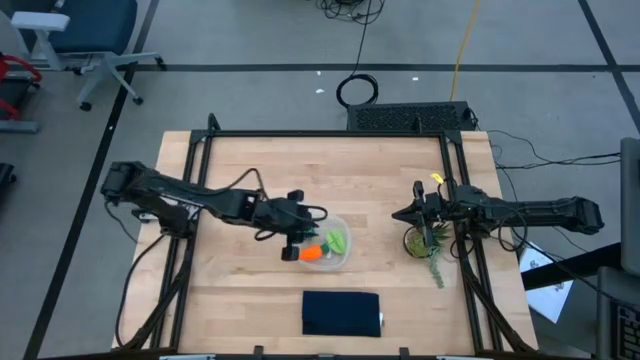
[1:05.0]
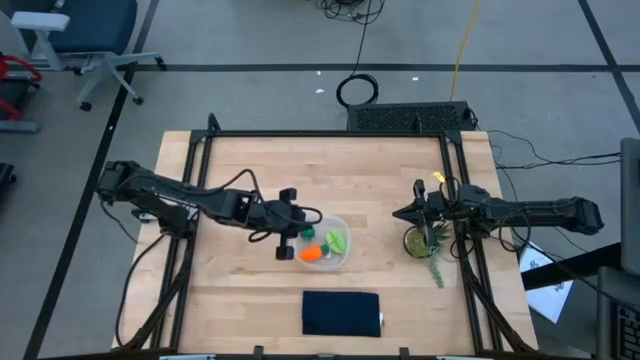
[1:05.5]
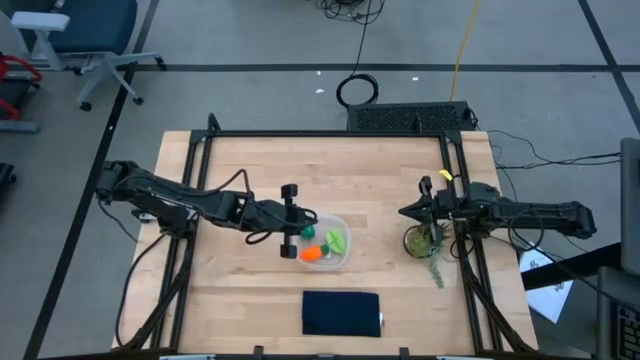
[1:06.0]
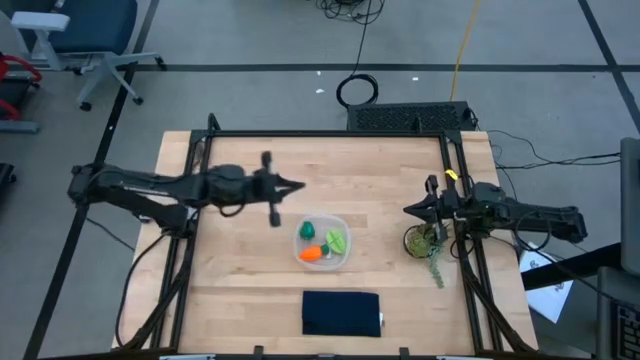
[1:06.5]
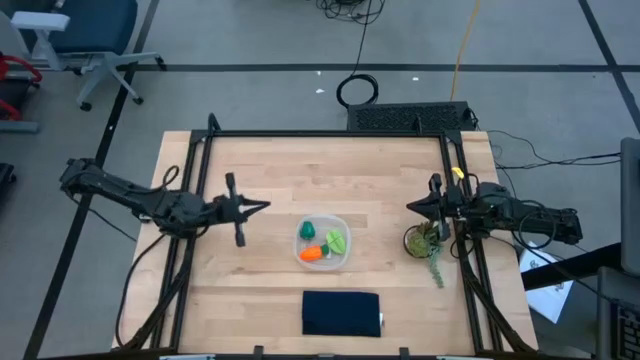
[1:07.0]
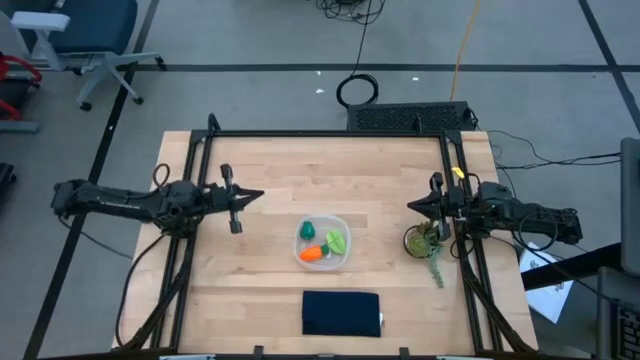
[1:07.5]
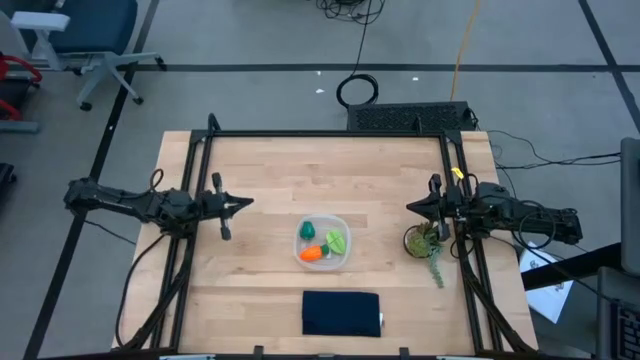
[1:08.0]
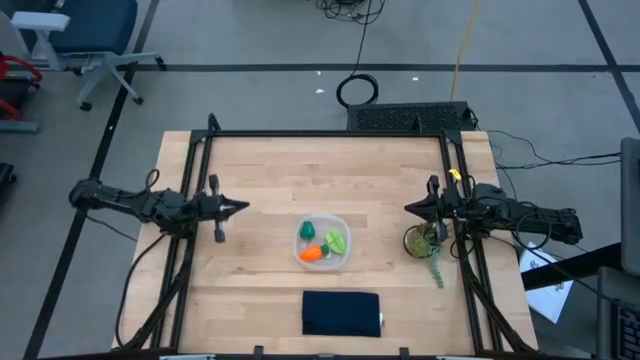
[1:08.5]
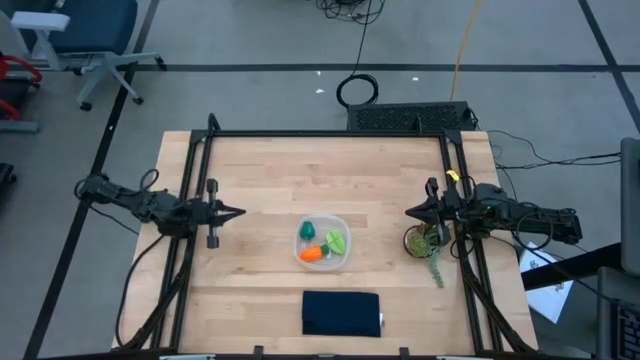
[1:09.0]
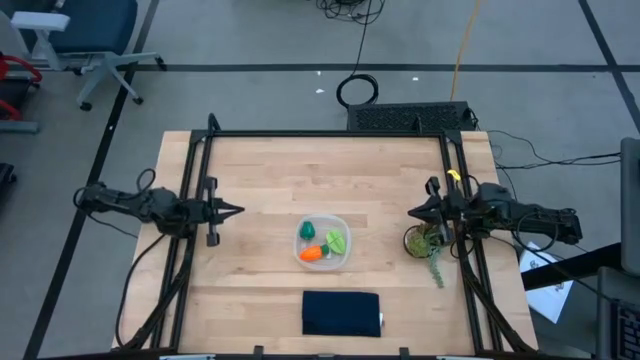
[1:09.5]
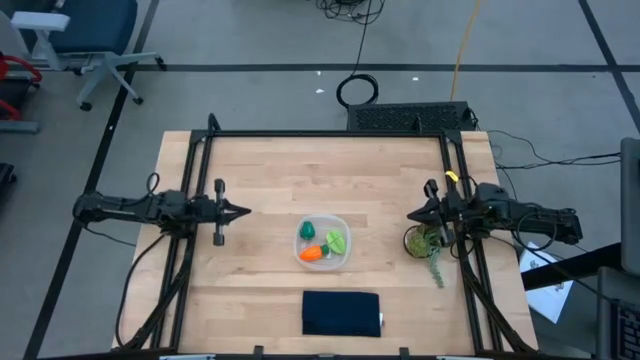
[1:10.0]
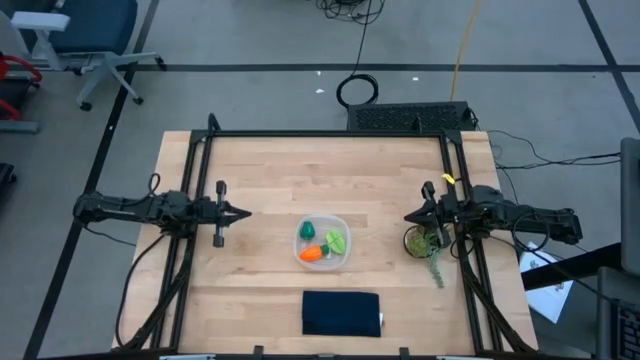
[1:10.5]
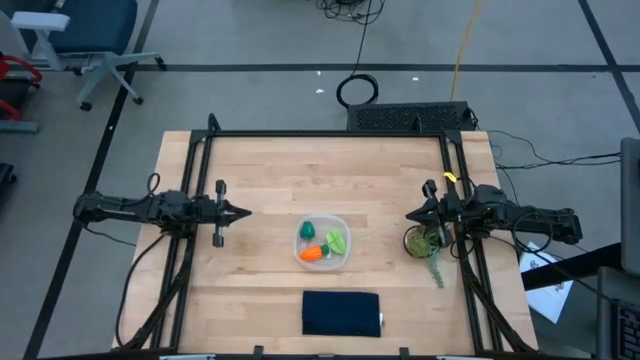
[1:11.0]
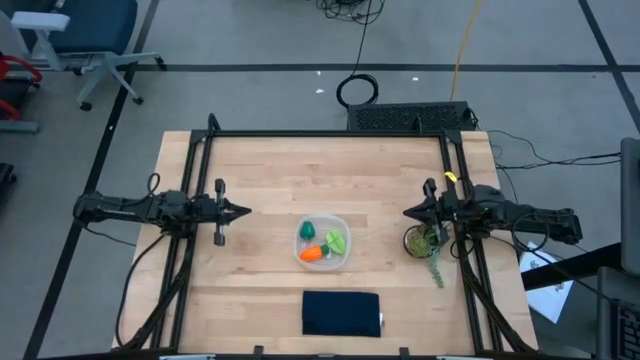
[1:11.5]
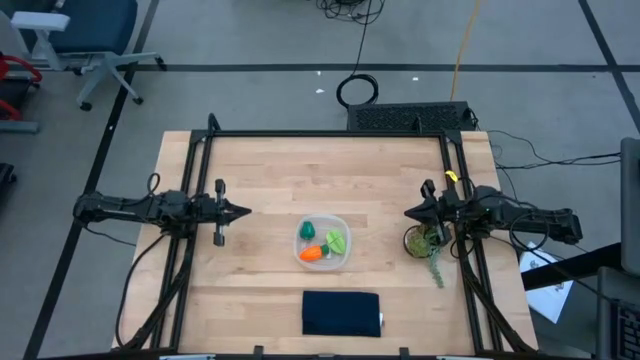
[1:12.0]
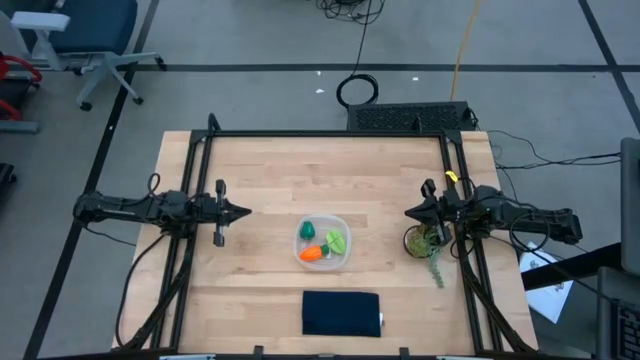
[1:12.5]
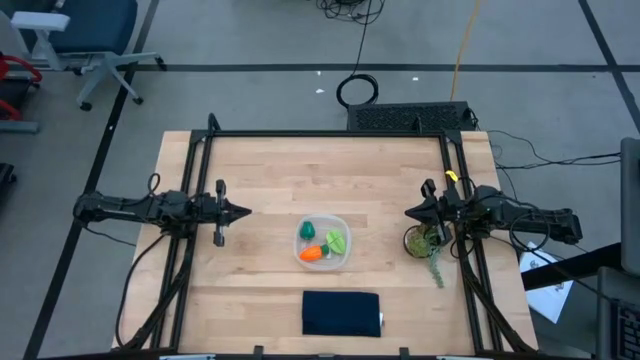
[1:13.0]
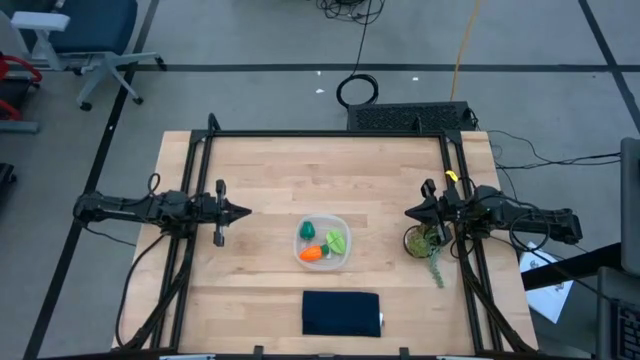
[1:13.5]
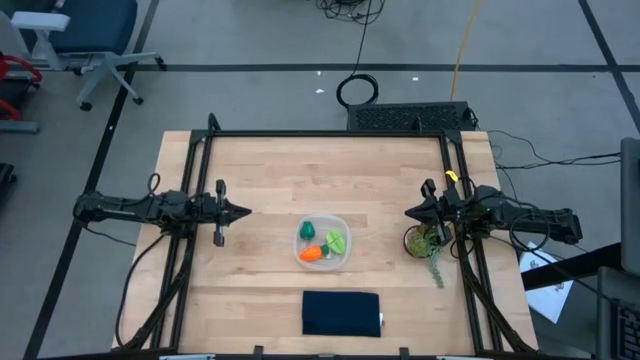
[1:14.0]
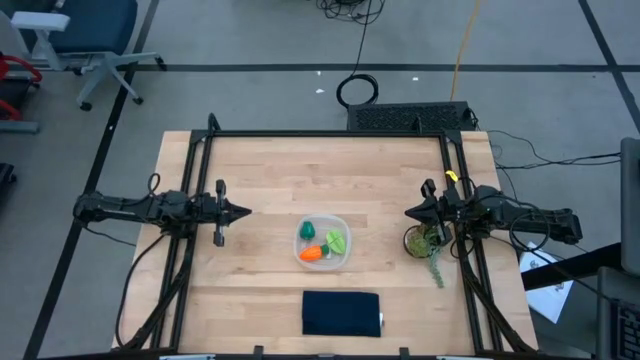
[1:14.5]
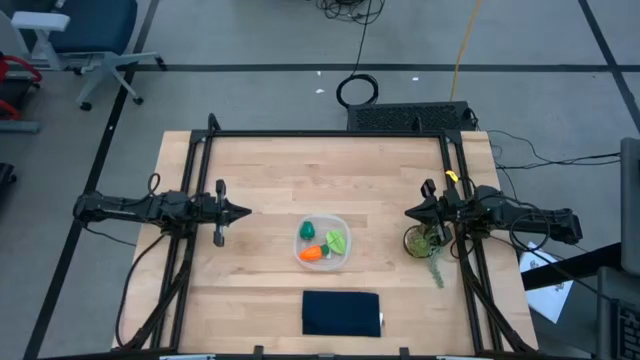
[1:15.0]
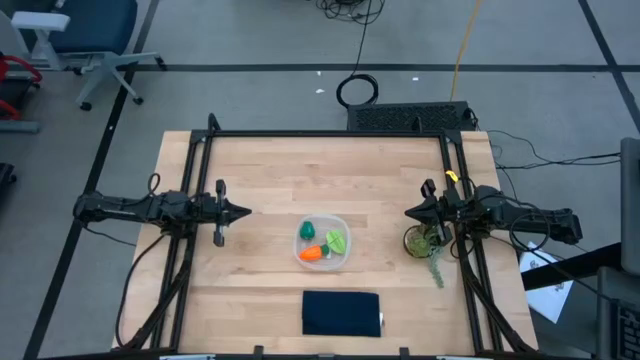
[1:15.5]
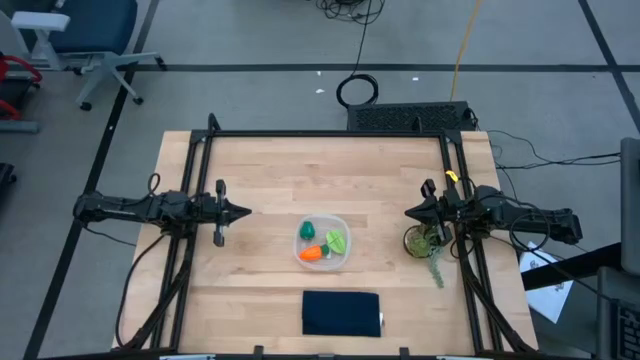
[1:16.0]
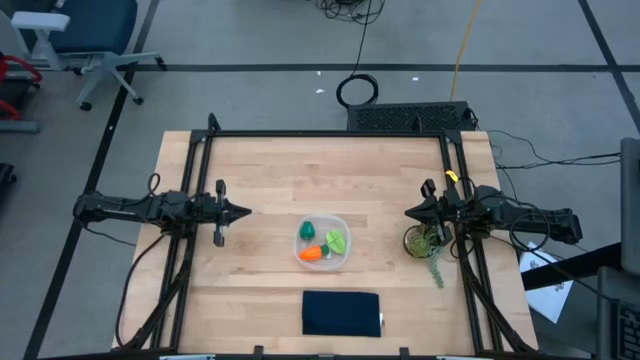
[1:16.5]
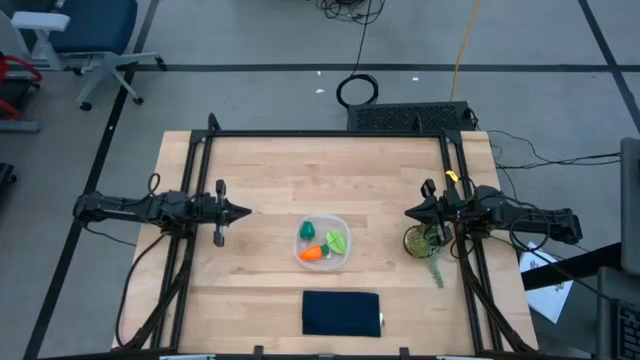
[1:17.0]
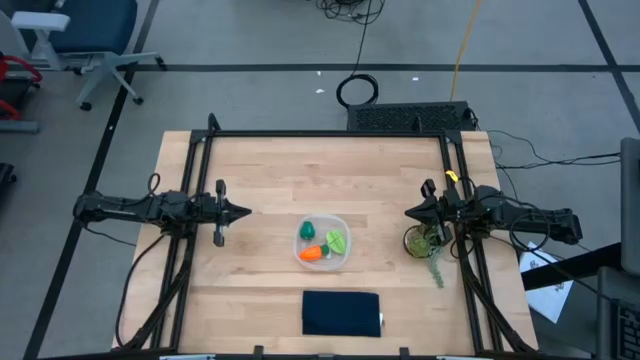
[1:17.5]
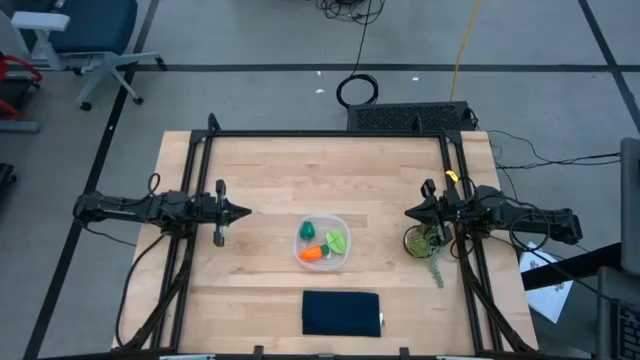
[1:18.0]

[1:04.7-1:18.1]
Task: Pick and placing Produce into tupperware
Return to Home Position

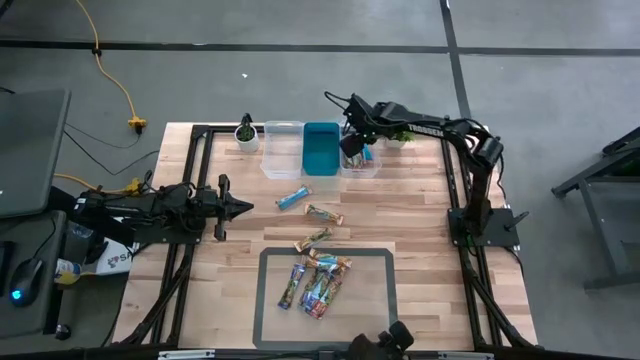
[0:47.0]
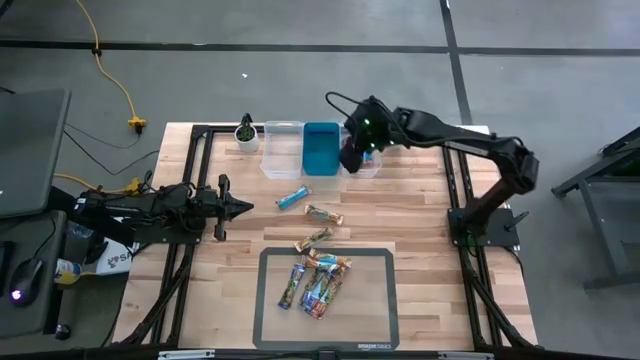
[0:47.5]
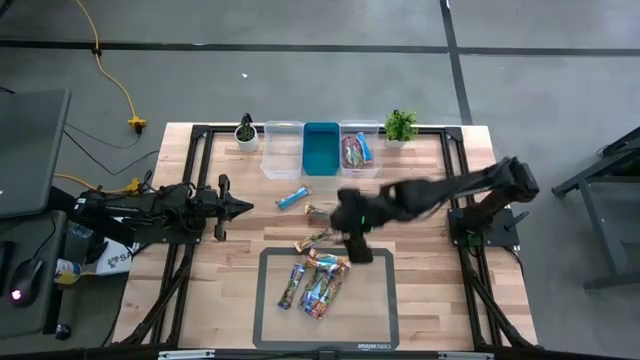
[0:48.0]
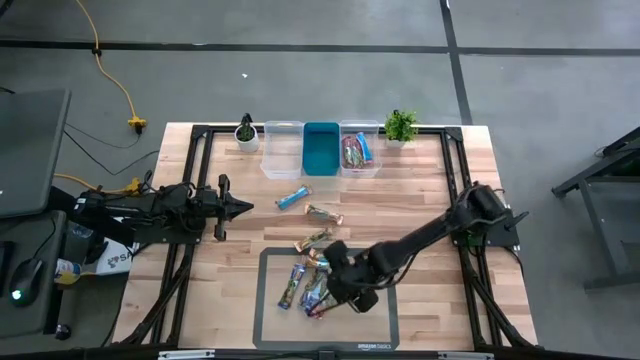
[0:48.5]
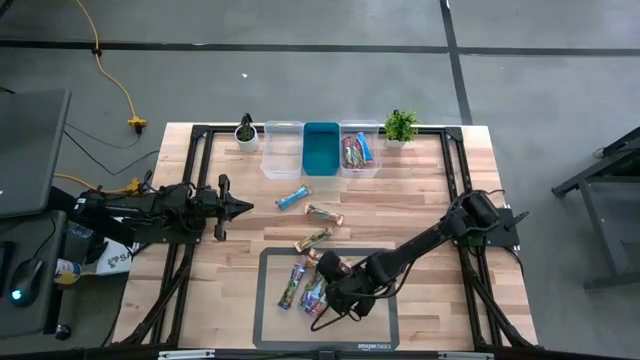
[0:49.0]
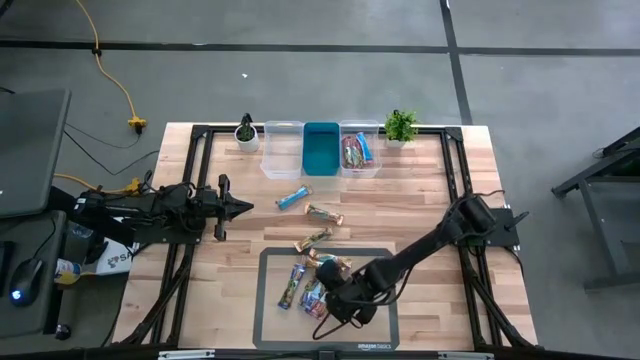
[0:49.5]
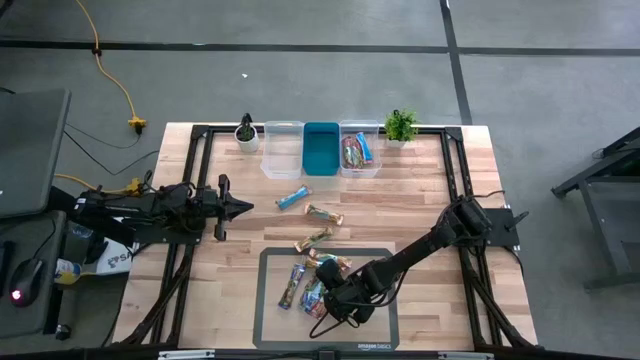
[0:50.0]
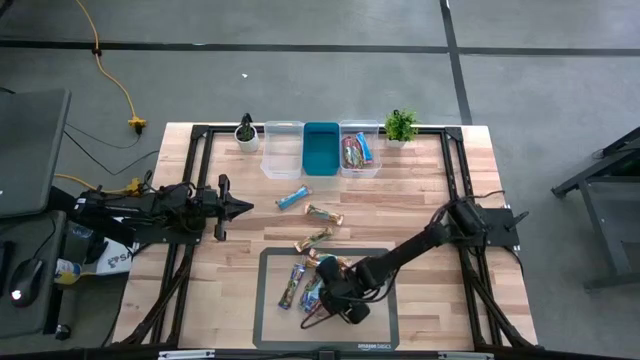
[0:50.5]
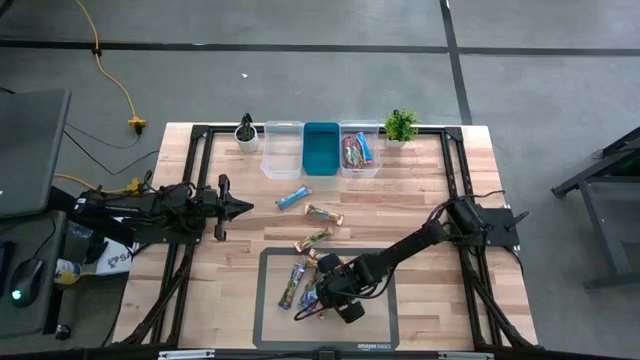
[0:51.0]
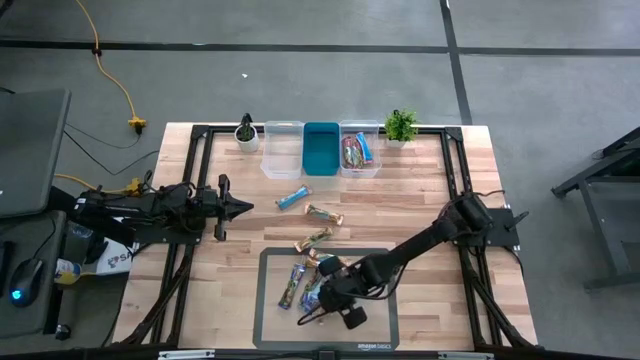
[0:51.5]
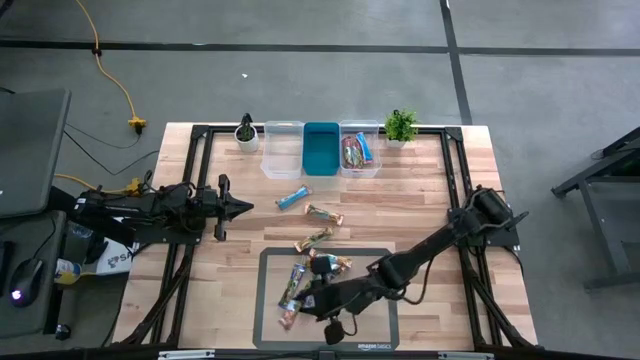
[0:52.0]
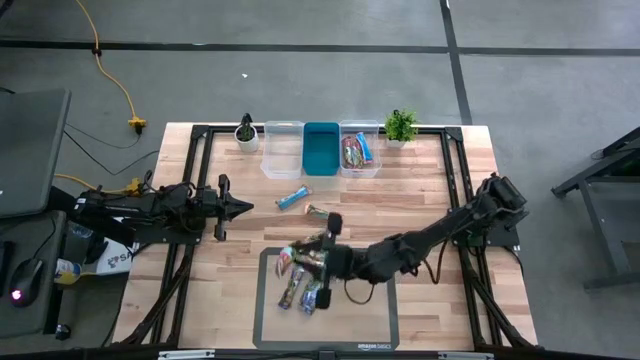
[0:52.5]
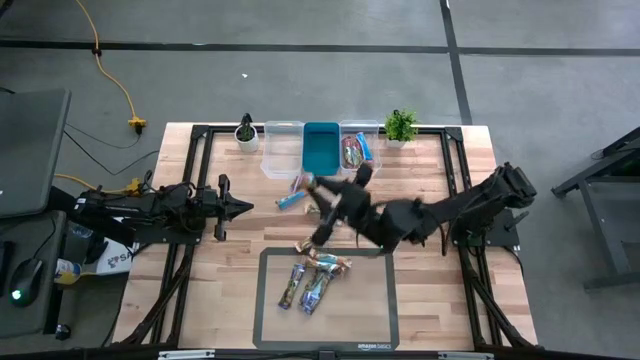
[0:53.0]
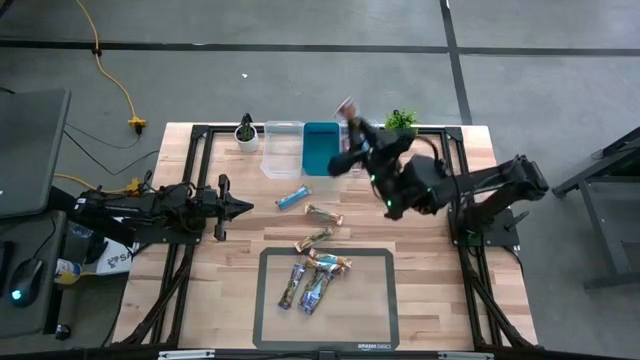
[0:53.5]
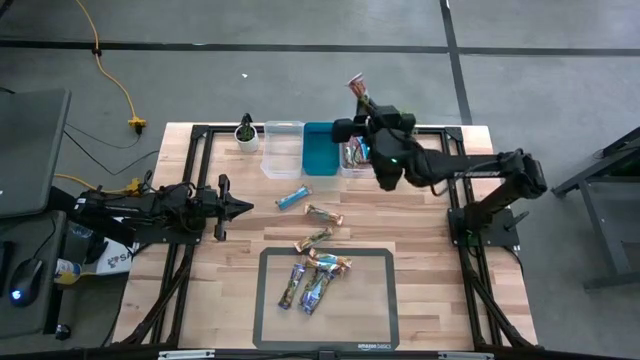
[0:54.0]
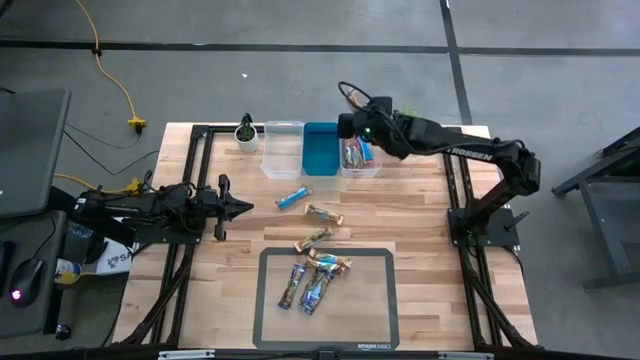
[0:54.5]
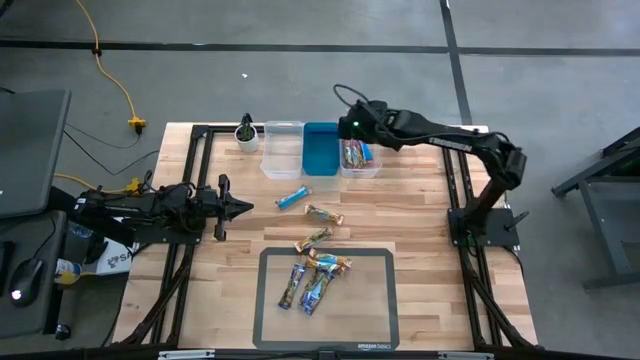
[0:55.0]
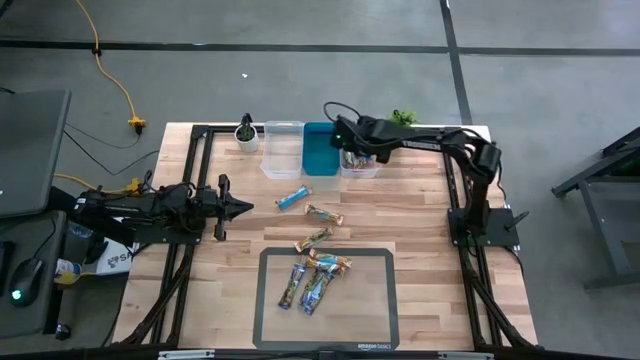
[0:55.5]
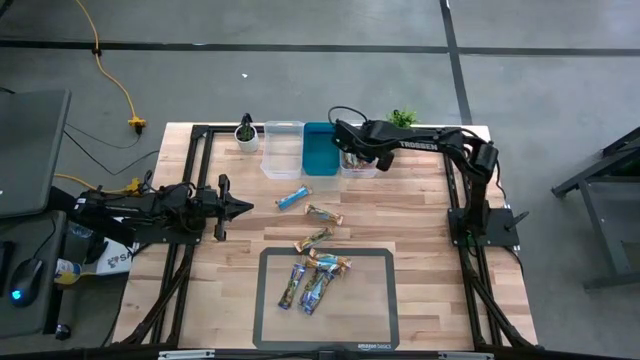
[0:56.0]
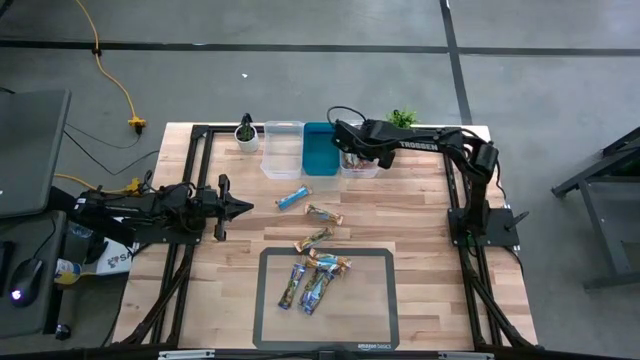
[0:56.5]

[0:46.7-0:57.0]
Task: Pick and place Granola Bars by type
Put the red granola bar into the right transparent bin
